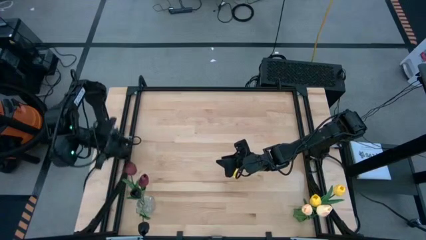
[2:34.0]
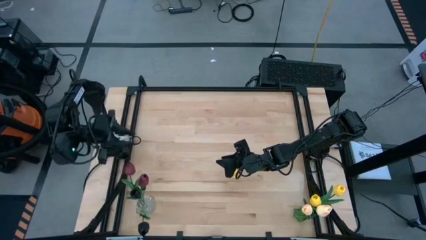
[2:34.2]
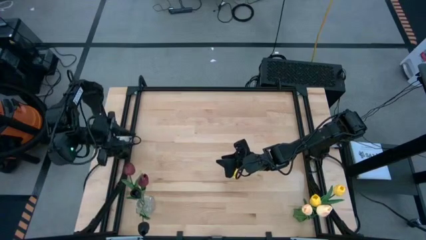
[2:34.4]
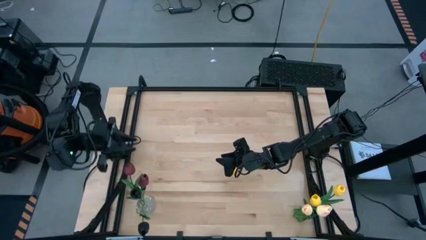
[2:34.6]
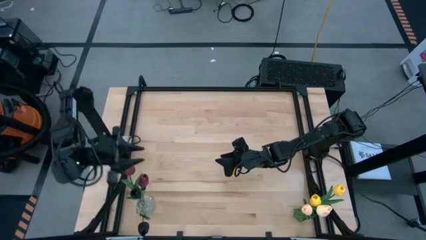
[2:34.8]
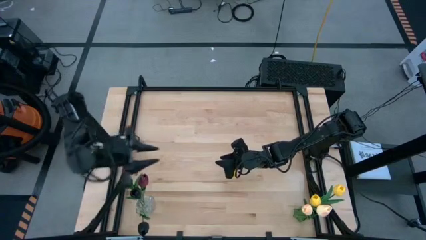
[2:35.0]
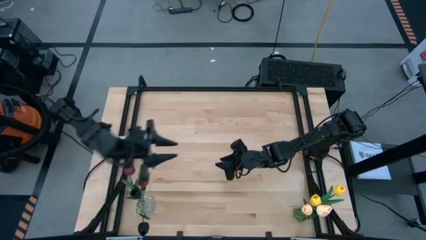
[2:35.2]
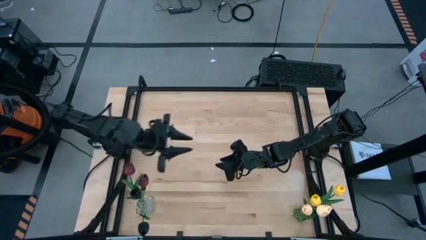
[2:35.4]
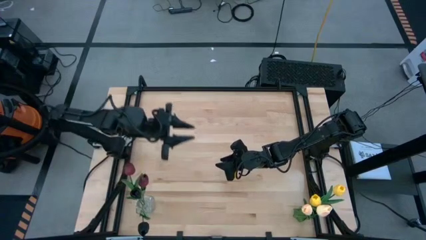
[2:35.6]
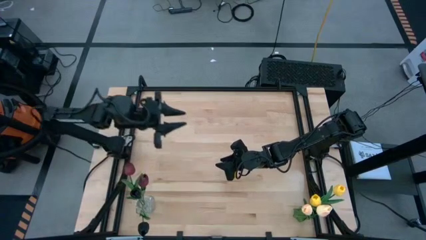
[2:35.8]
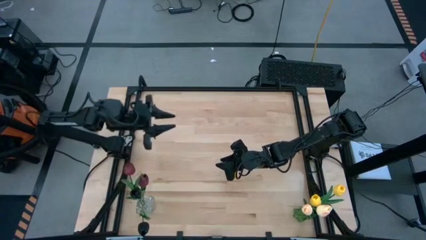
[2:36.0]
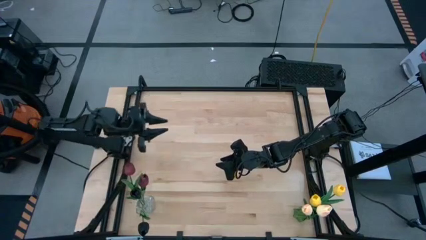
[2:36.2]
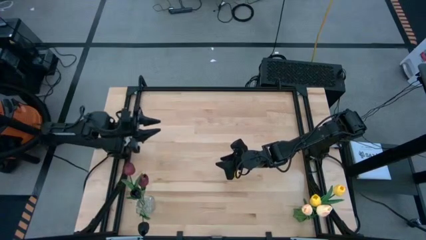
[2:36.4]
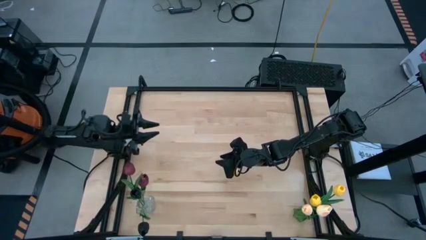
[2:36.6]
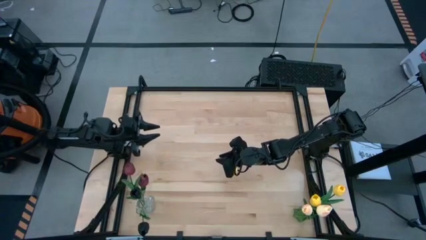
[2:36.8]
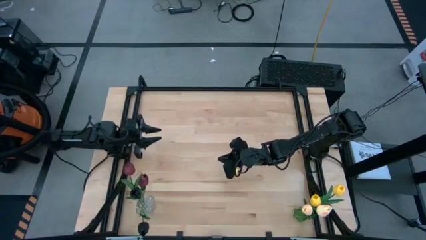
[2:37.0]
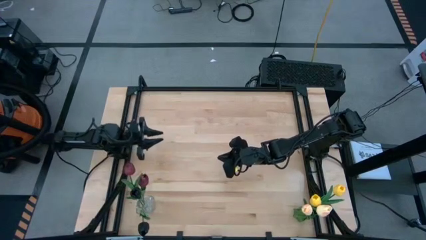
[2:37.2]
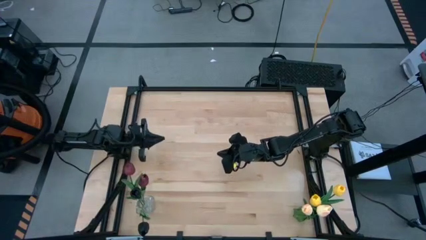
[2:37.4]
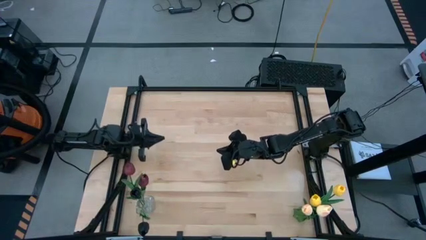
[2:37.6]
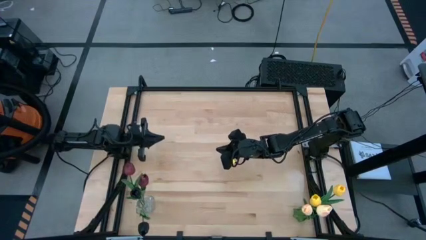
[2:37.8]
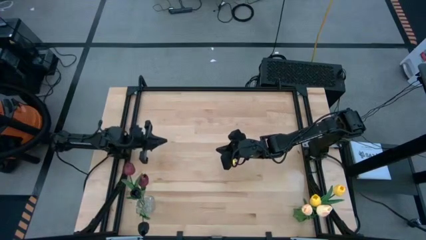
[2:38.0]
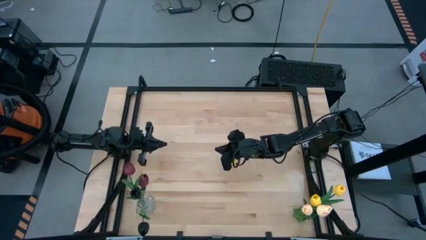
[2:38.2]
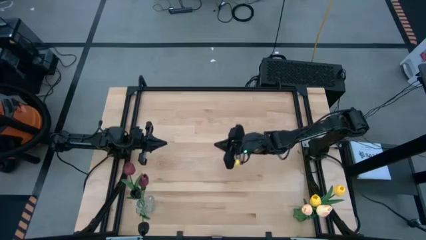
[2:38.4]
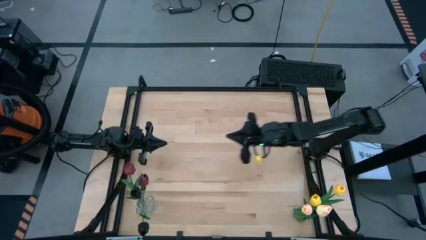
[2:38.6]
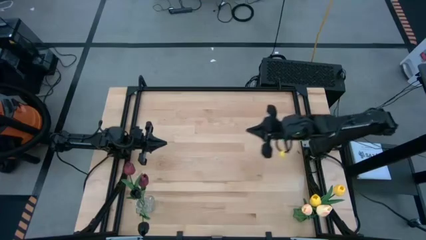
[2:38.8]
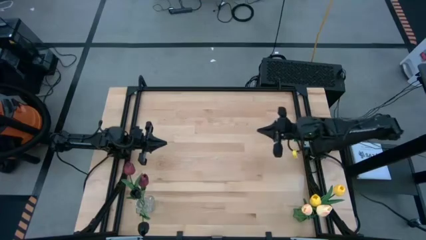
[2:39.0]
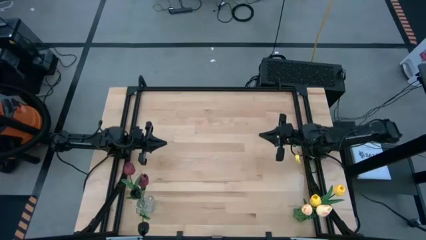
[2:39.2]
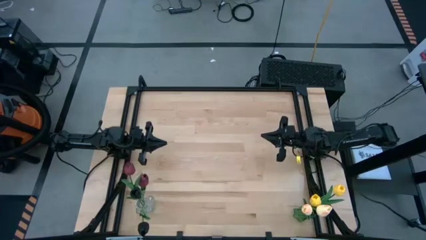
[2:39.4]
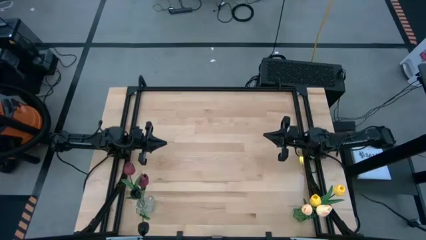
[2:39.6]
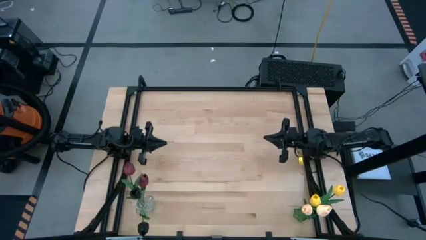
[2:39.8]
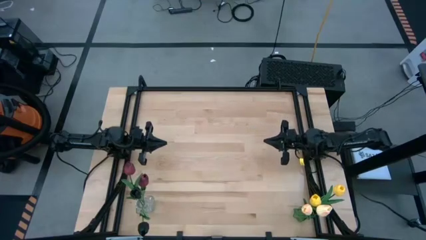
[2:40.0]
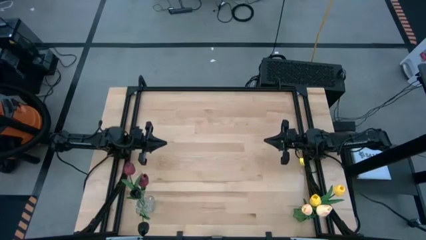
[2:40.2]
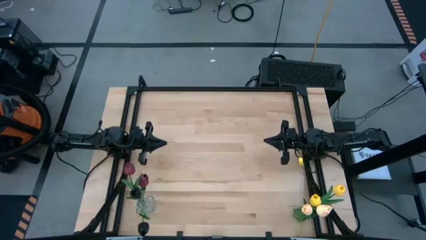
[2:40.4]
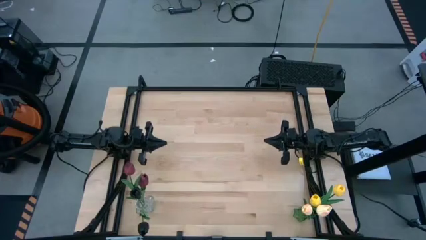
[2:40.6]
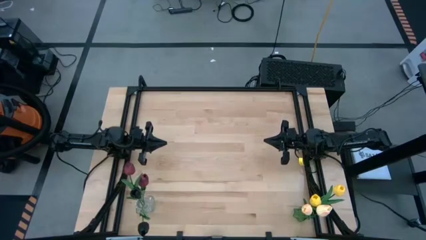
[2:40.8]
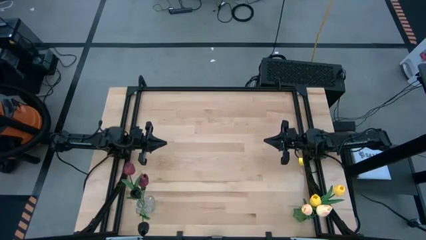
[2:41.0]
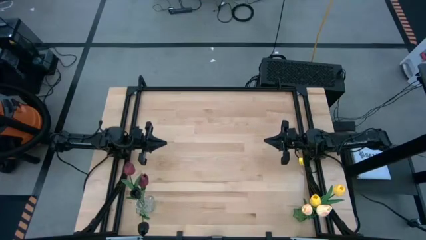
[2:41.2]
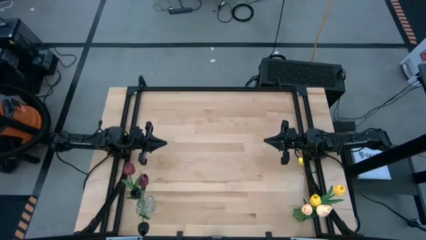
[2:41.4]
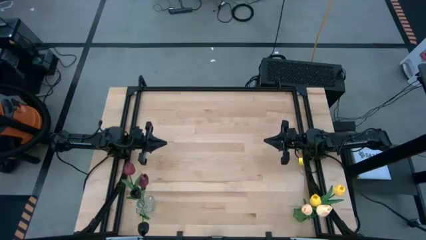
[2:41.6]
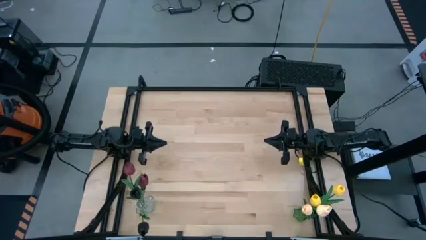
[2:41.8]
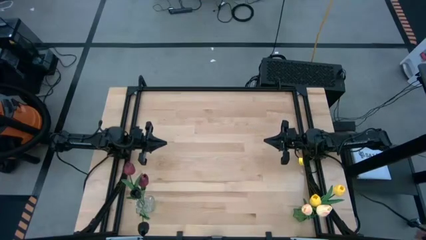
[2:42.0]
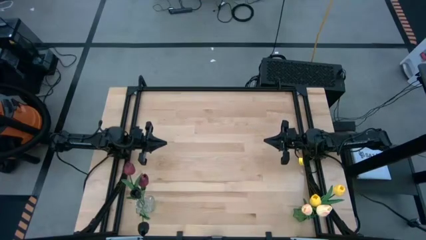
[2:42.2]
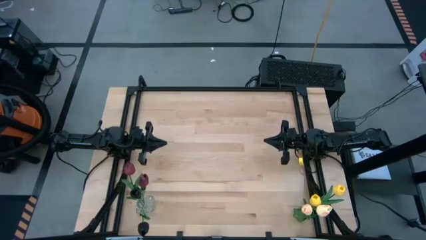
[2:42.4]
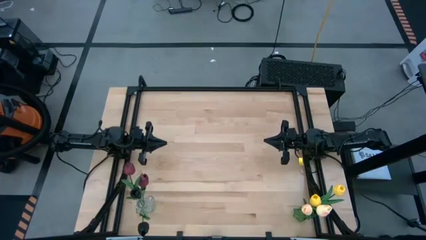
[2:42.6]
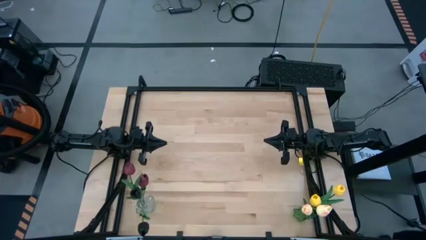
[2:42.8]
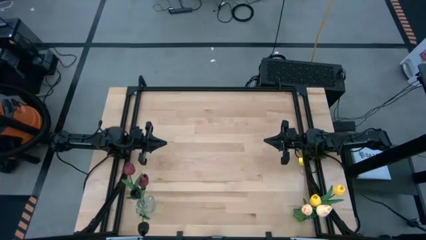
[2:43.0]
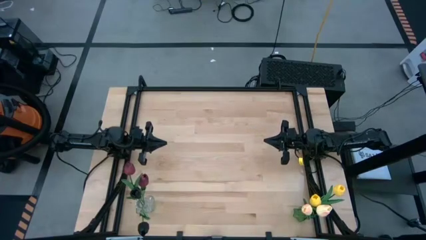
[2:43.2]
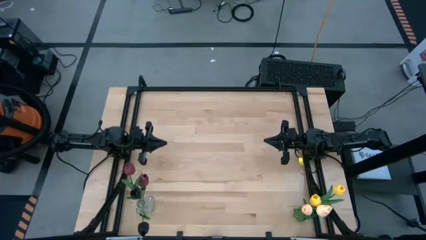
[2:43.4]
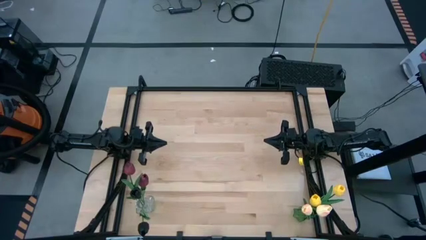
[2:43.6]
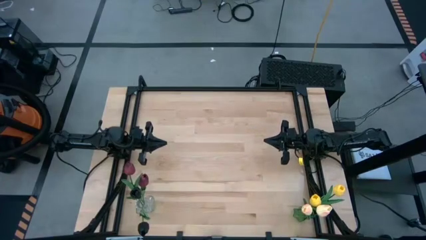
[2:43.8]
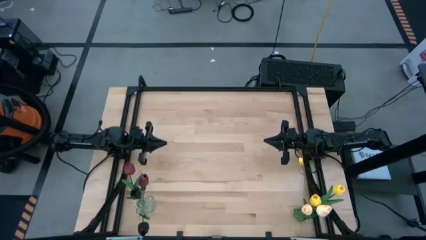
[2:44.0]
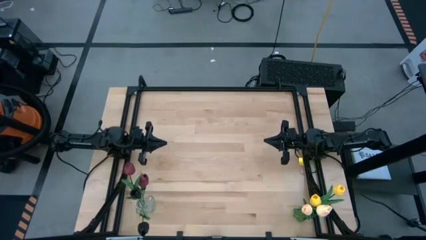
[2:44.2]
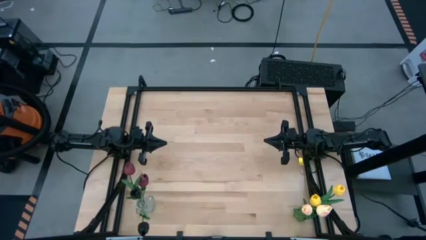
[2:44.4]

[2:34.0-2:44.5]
Task: Sort flowers into vase by color
Return to Home Position

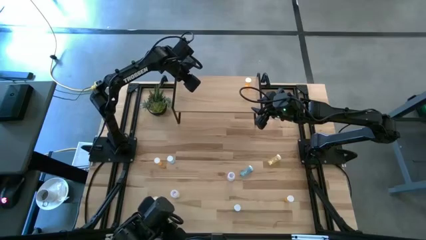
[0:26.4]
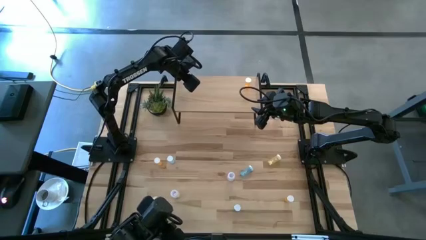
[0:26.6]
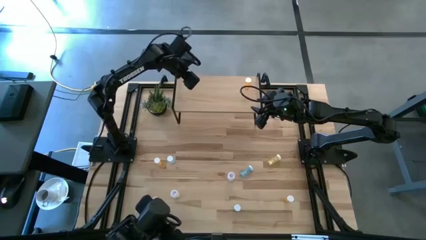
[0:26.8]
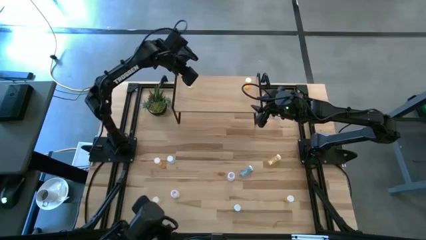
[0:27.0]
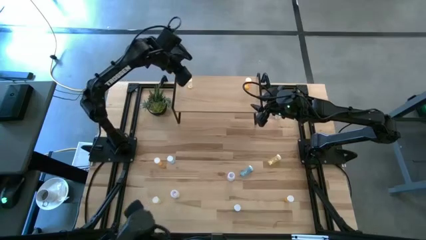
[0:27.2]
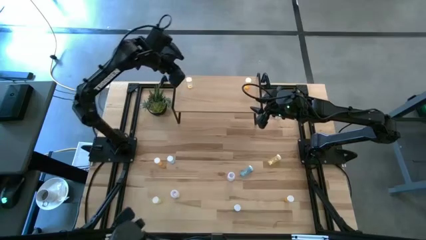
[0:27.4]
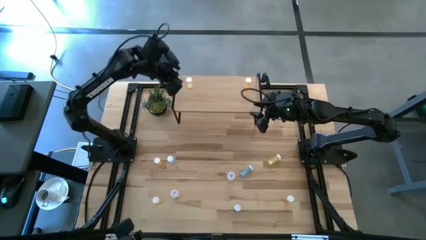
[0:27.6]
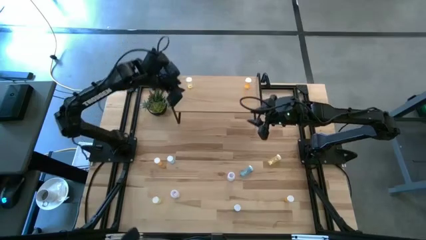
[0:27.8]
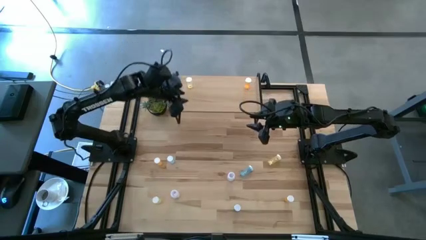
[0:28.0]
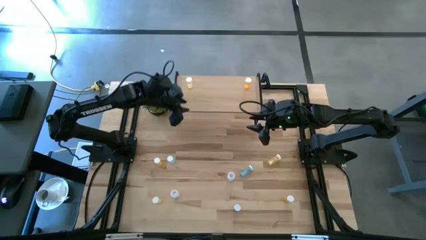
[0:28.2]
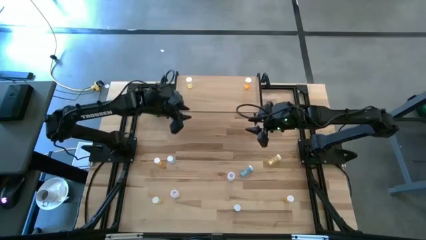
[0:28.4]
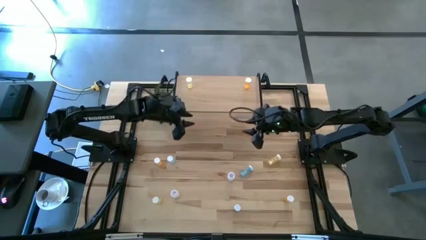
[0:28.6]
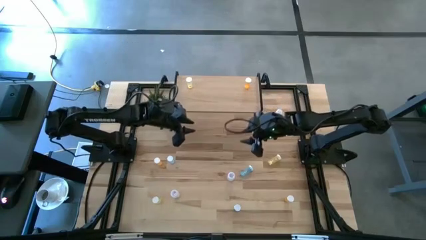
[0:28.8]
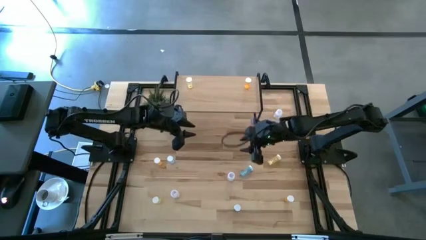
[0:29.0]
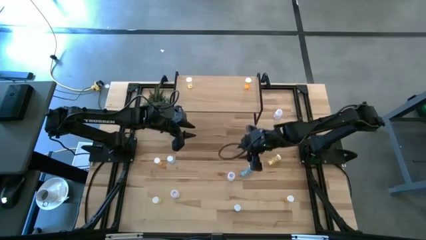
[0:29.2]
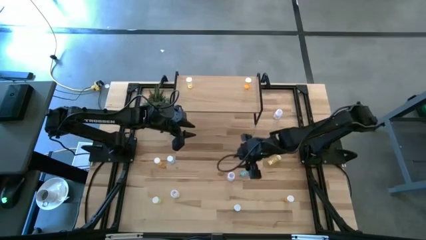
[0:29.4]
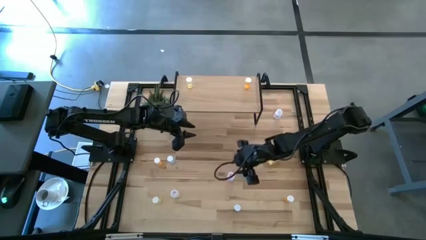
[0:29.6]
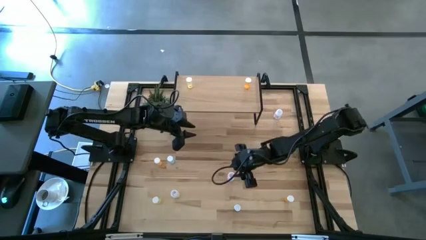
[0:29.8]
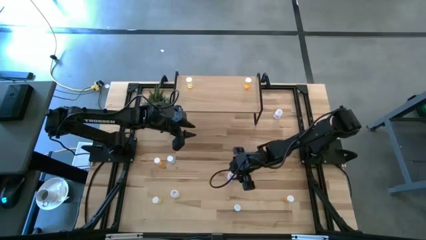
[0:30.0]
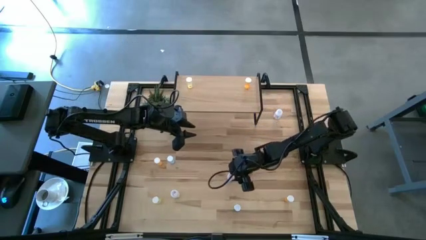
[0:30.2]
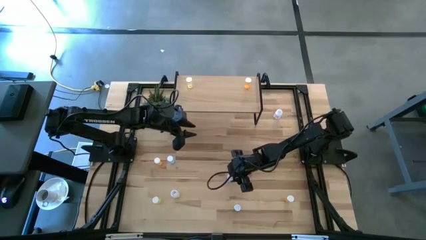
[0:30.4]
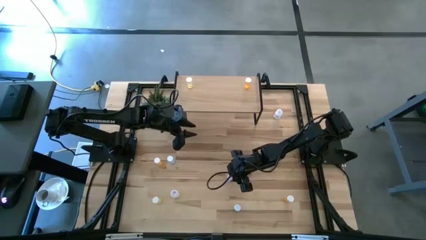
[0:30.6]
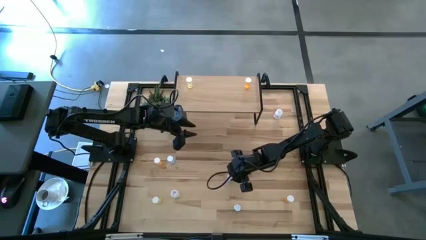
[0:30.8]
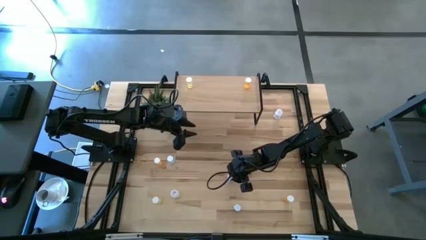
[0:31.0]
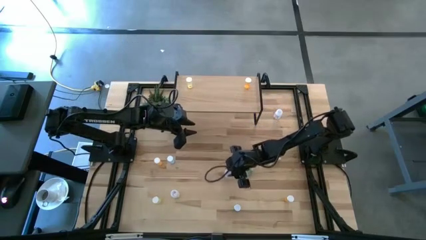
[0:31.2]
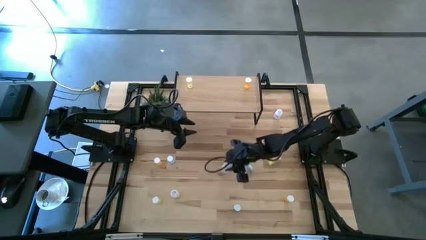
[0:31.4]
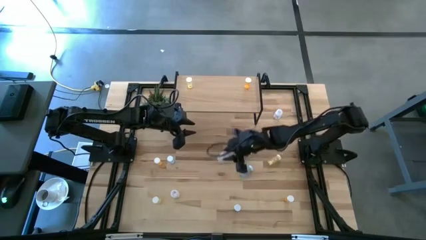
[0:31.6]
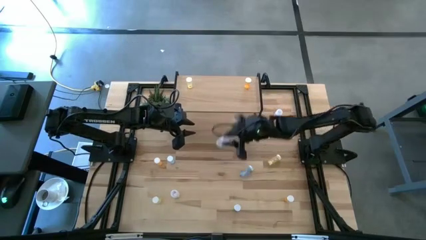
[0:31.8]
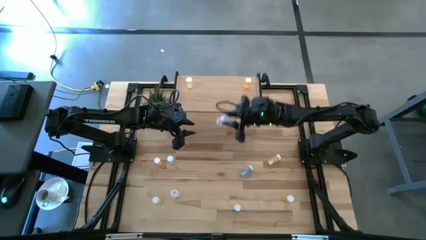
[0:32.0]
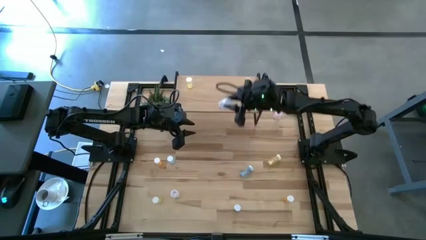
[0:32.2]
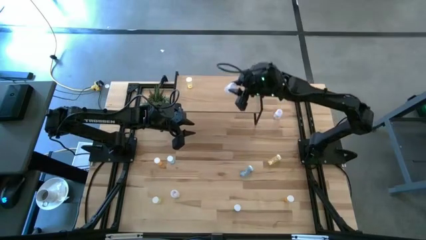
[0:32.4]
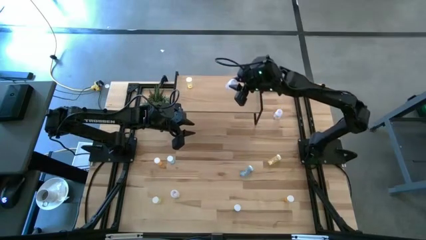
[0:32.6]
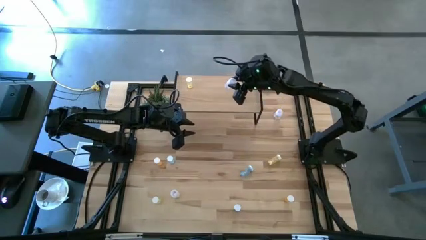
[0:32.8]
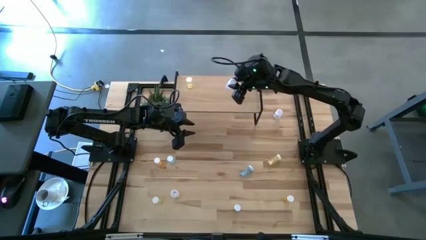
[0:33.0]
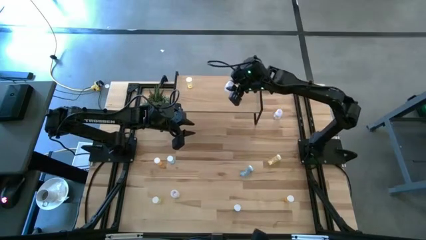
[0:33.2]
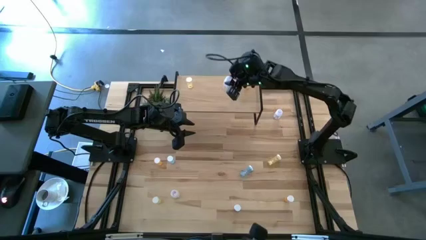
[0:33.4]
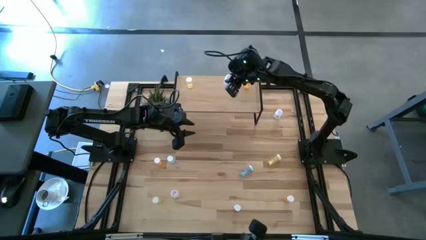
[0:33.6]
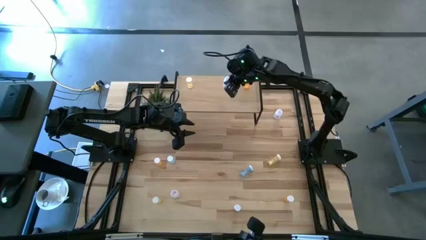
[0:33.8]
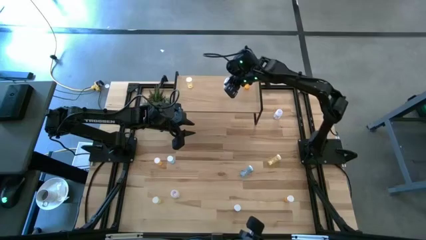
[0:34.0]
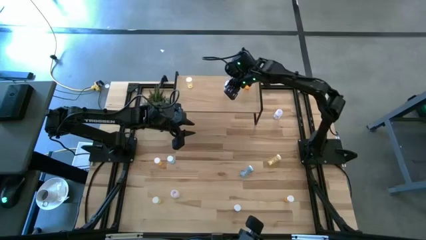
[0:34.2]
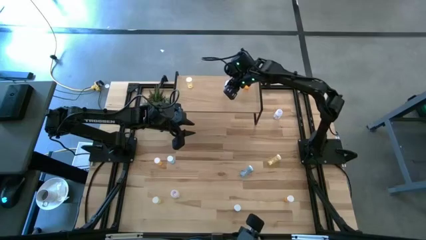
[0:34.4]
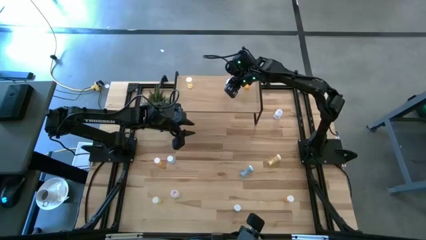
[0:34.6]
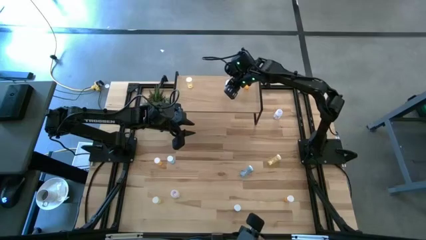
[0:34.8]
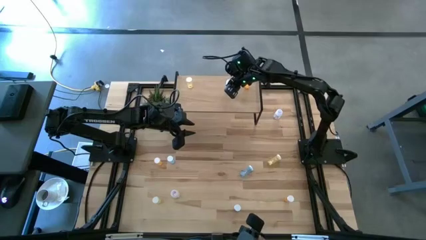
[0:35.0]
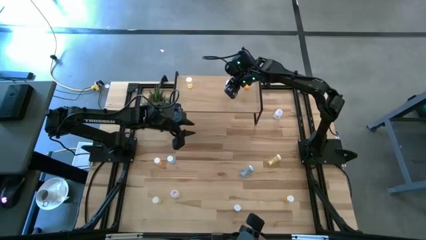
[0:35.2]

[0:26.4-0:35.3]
Task: Pick and place medicine bottles onto shelf by color
Put the middle transparent pill bottle on the shelf
